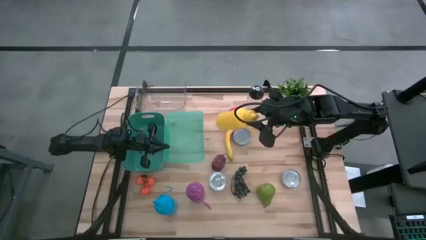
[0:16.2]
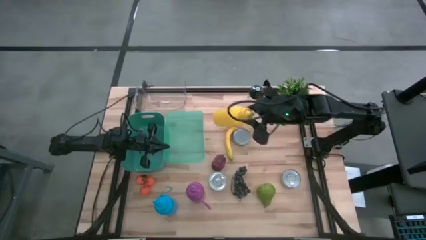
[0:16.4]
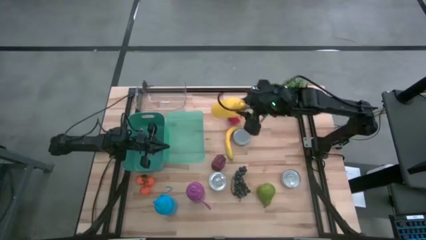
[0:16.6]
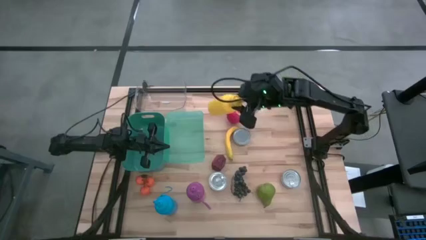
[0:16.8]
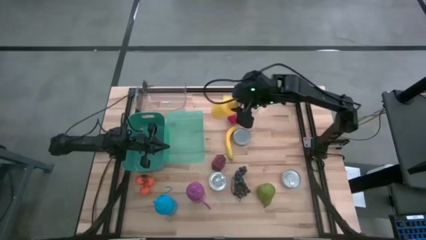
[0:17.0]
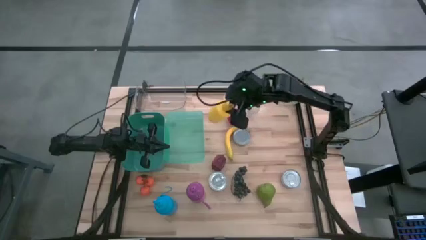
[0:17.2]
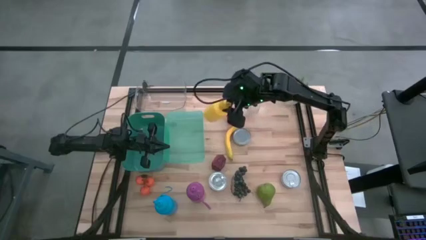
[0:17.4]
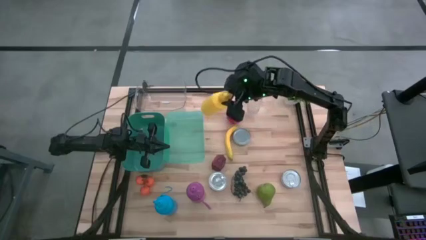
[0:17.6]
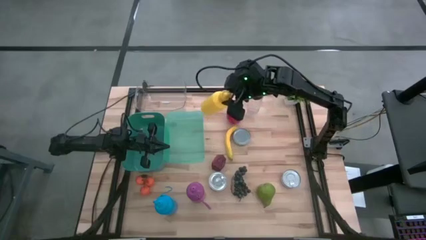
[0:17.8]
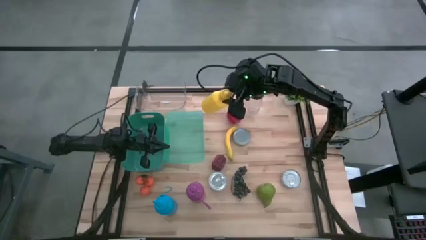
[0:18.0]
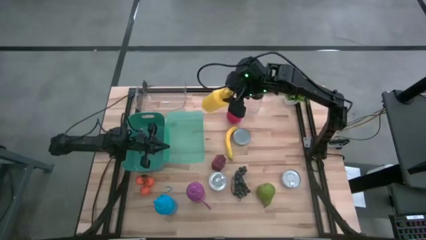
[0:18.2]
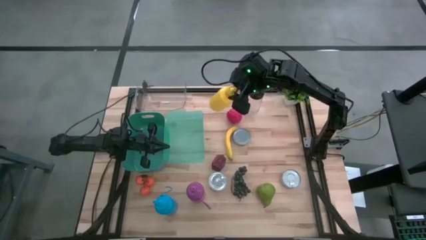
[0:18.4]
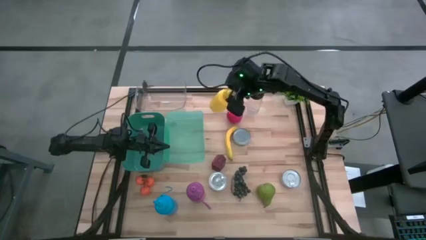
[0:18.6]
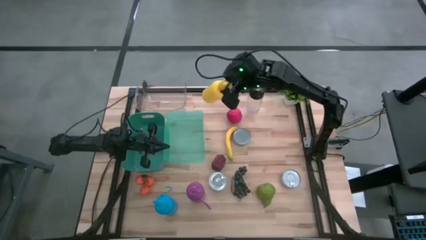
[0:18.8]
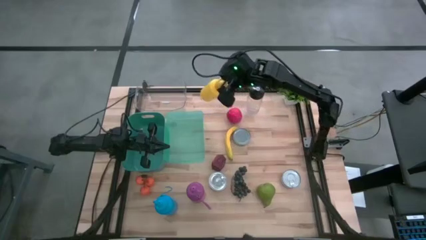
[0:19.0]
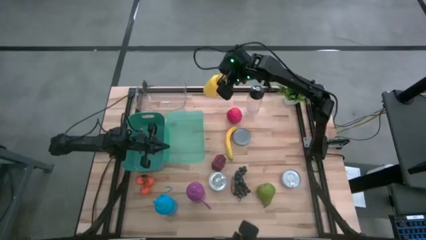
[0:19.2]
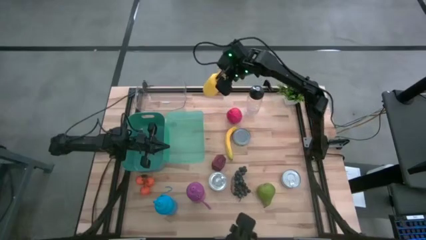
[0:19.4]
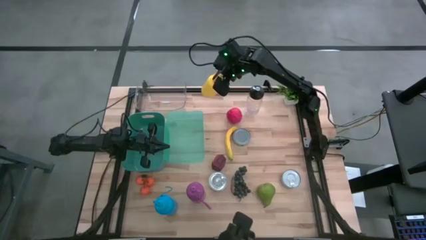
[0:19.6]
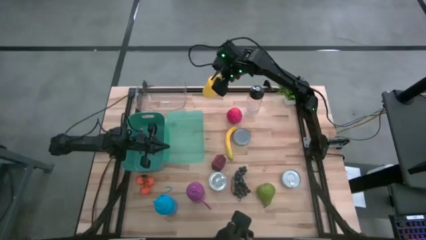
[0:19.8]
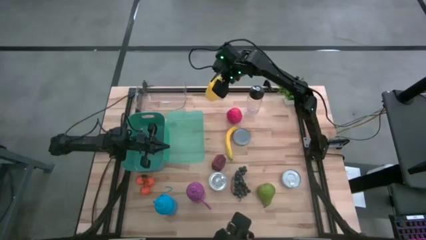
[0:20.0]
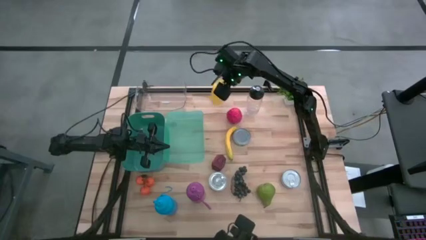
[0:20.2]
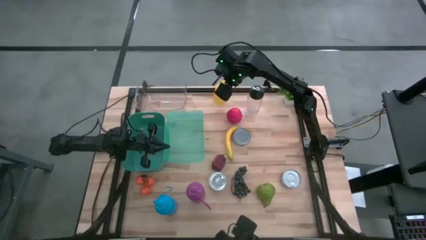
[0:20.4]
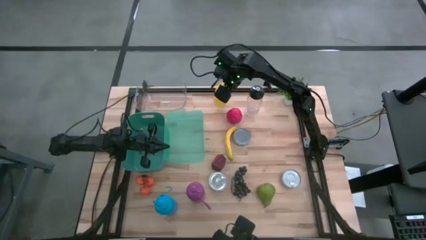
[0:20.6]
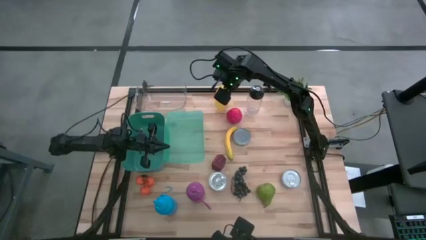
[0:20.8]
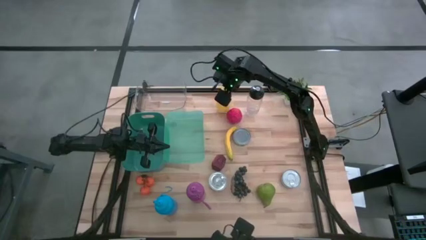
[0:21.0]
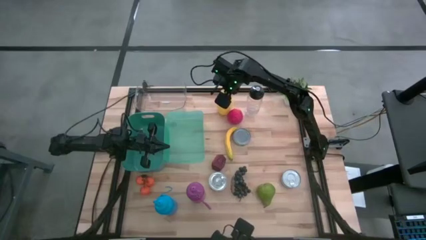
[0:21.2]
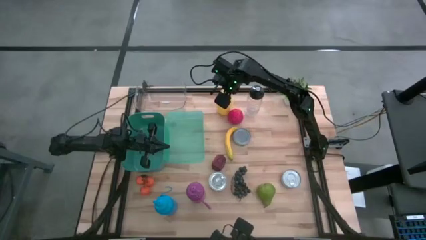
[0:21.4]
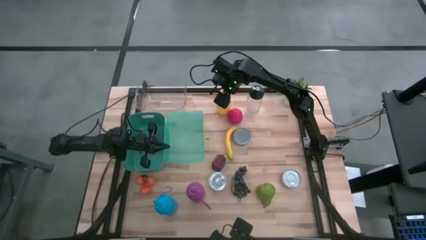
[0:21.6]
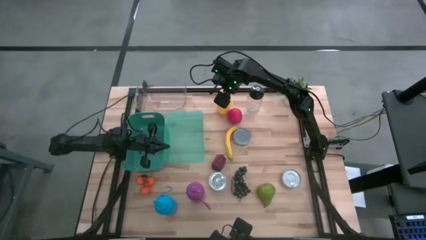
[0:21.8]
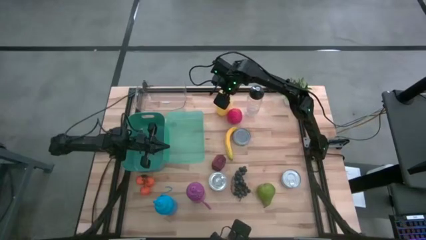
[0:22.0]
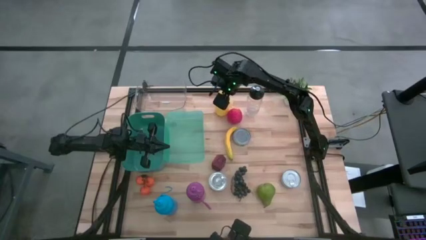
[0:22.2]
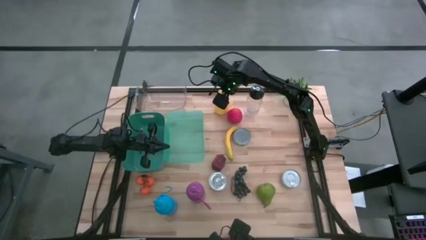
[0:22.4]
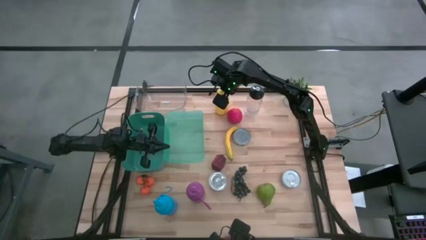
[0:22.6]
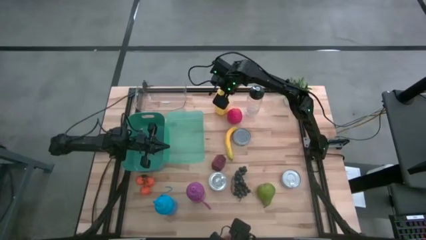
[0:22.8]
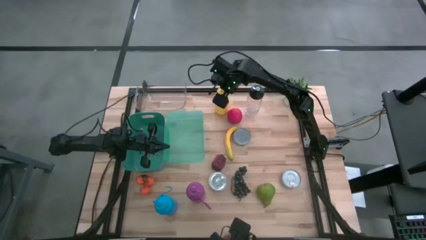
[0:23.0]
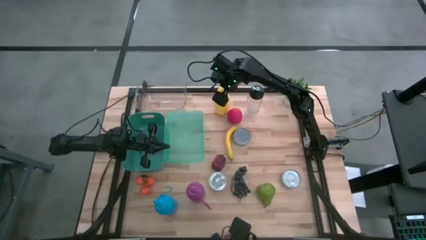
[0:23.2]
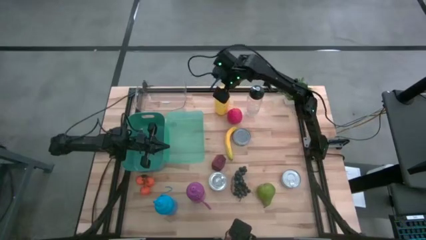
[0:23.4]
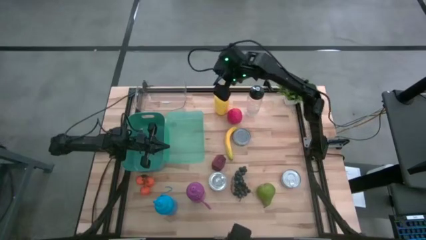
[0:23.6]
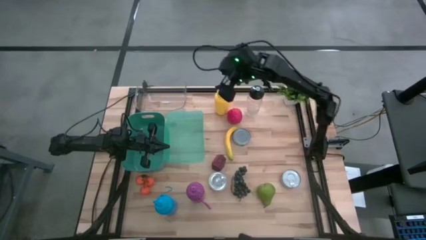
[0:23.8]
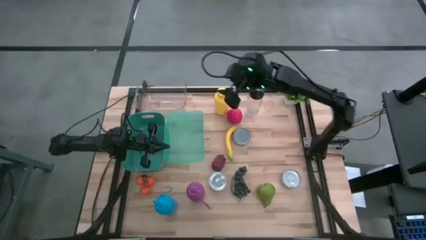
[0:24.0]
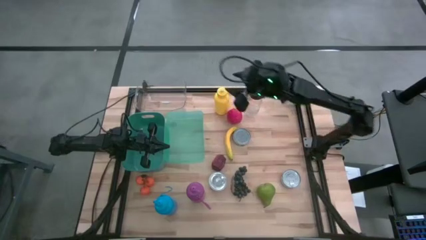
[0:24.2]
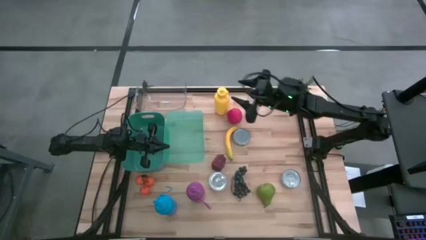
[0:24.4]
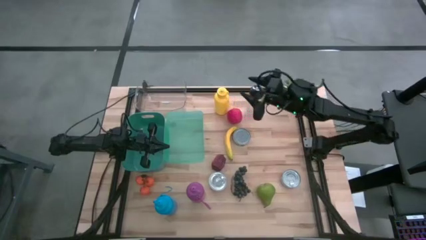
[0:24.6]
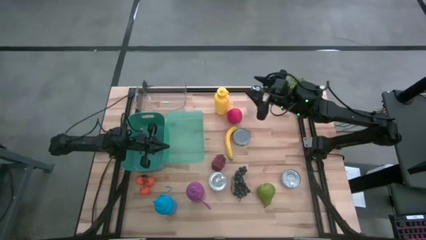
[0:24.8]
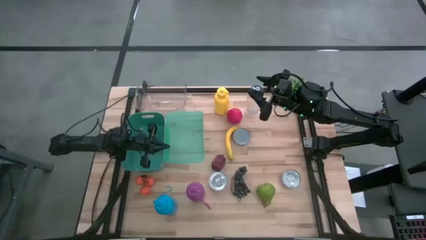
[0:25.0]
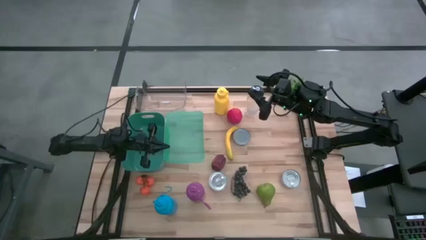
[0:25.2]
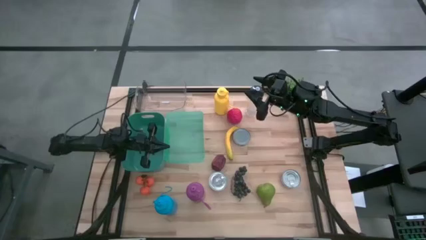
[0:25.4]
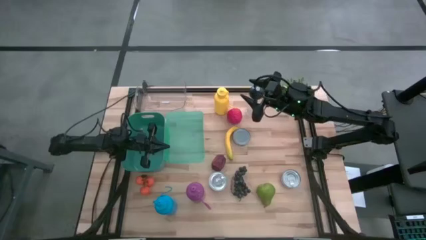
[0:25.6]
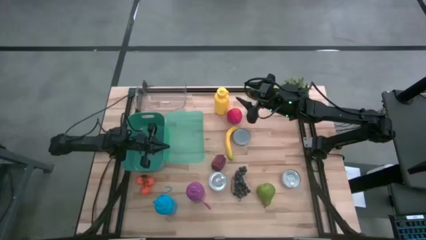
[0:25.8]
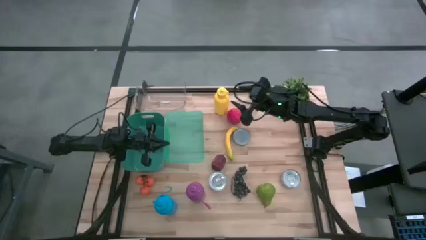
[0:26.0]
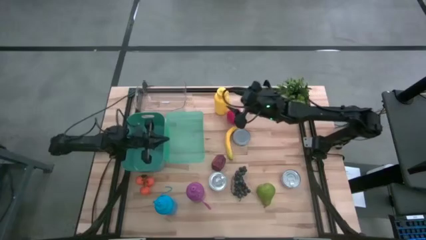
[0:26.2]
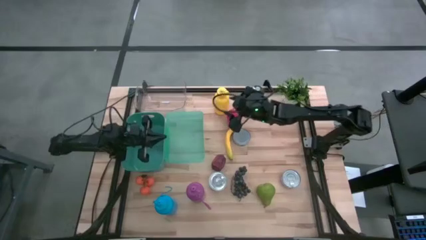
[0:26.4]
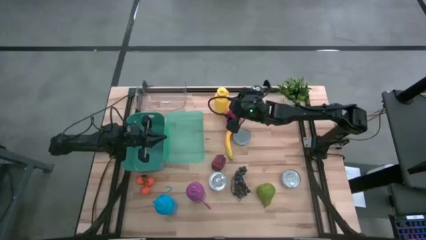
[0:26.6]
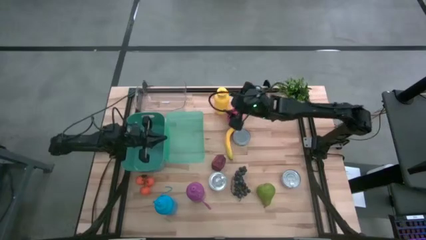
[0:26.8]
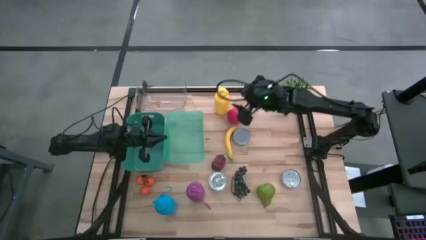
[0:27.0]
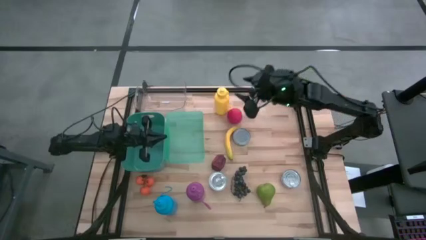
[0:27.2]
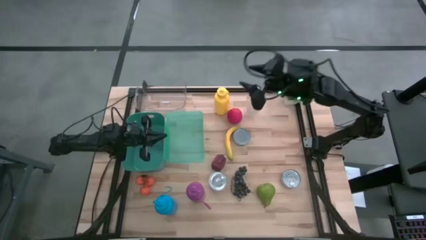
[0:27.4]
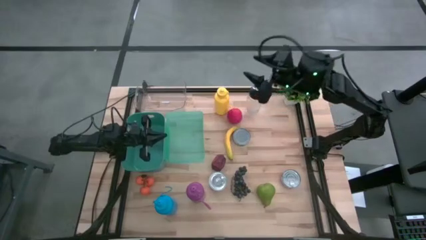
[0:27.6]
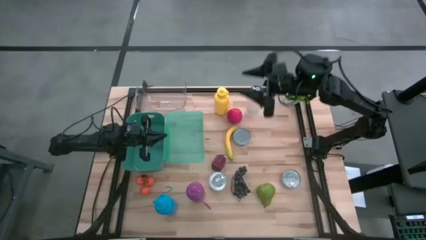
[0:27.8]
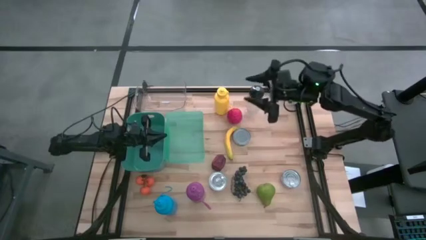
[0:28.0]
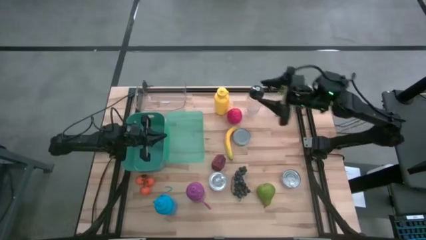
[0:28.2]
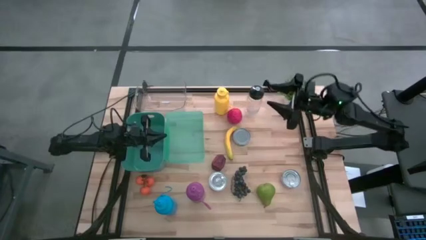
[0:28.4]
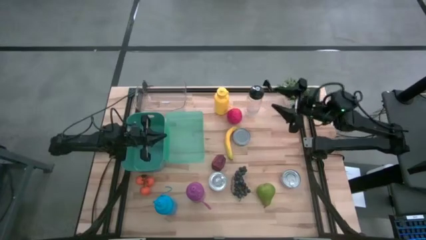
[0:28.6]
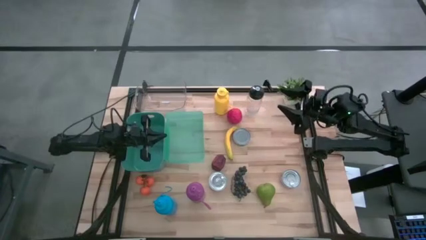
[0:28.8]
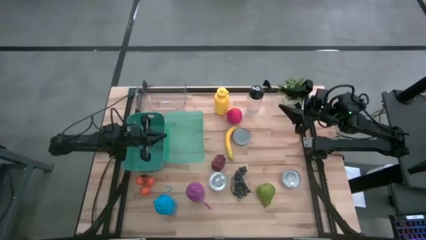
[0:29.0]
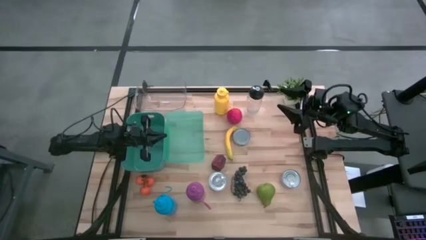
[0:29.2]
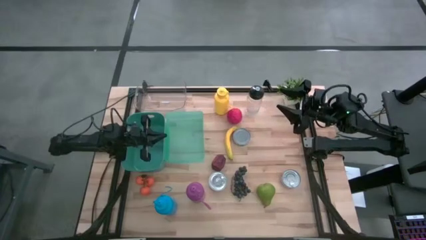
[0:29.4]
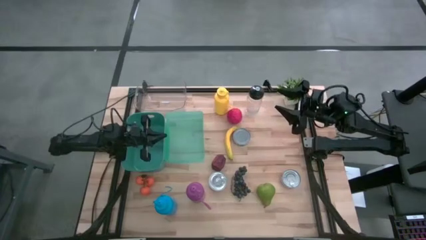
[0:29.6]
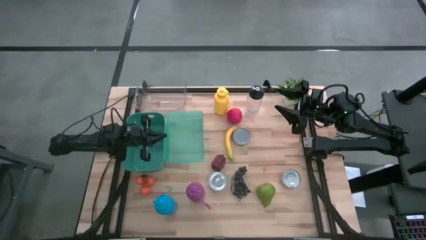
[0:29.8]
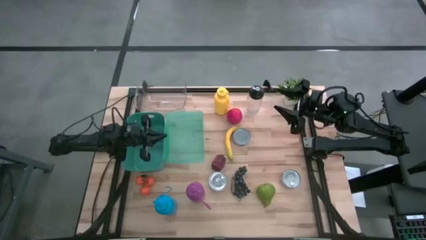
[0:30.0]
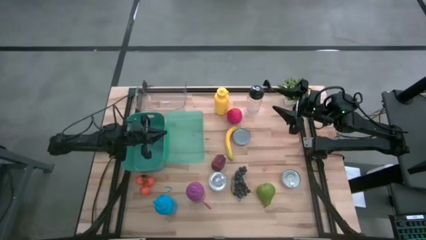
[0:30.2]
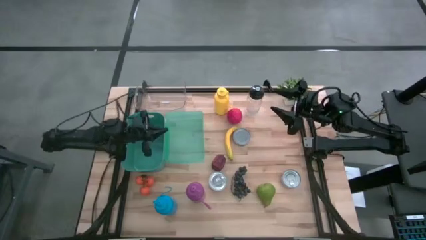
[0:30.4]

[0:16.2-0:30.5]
Task: Pick & Place Food Item
Put the yellow water bottle into the transparent bin
